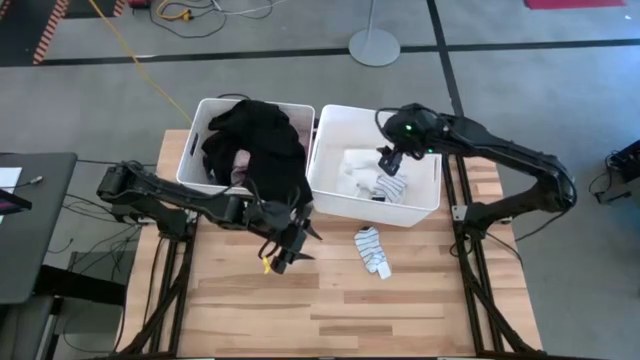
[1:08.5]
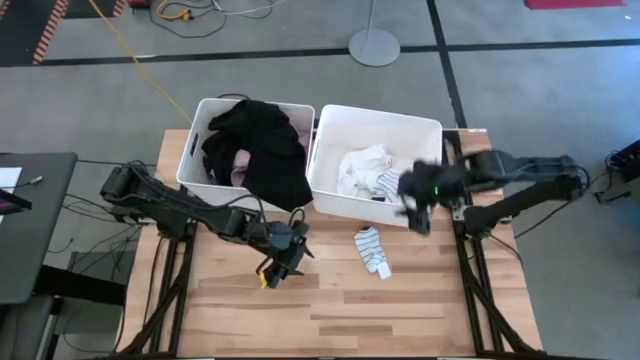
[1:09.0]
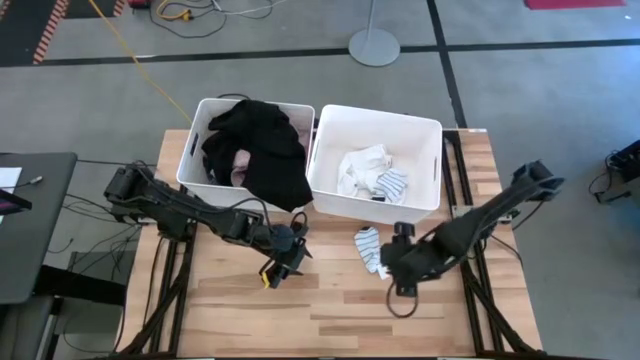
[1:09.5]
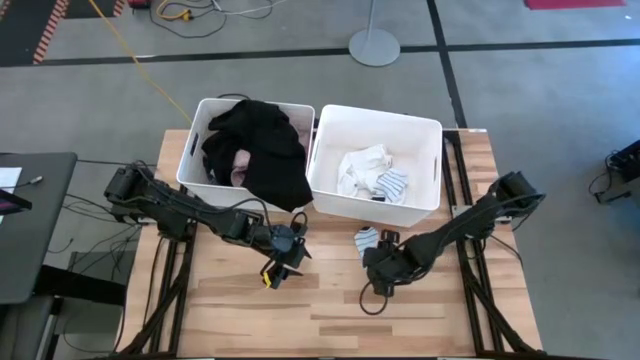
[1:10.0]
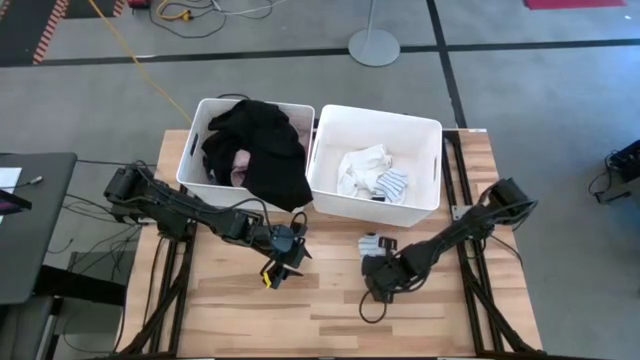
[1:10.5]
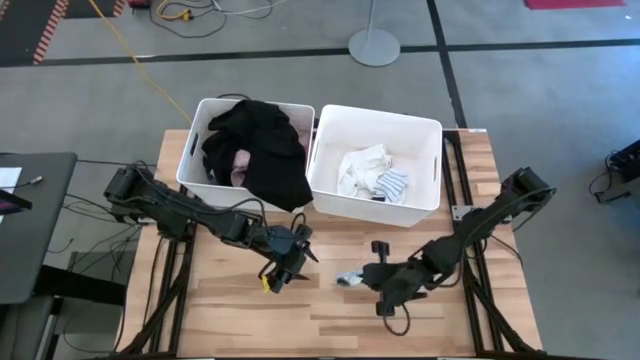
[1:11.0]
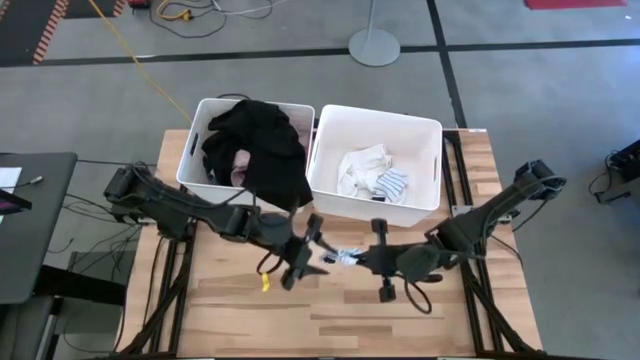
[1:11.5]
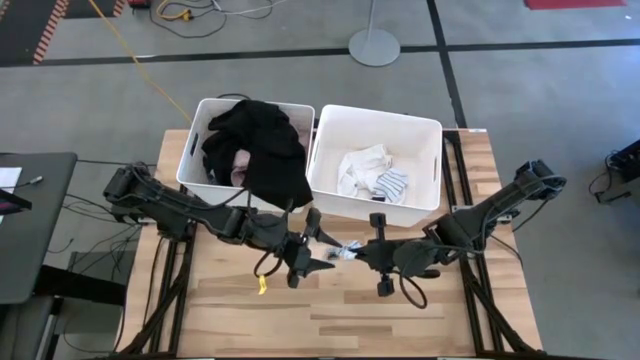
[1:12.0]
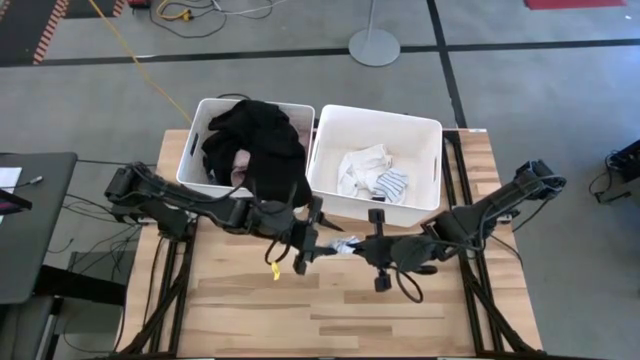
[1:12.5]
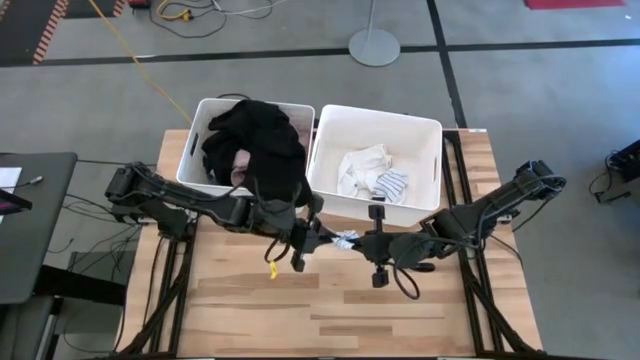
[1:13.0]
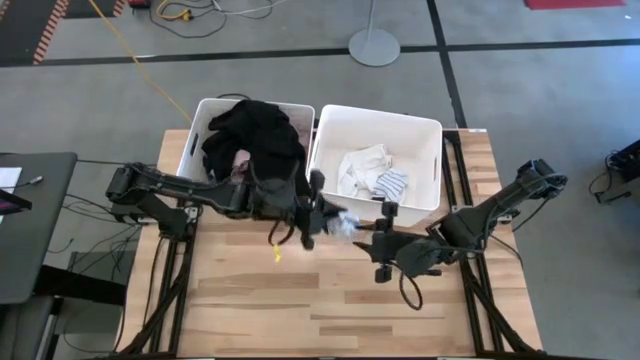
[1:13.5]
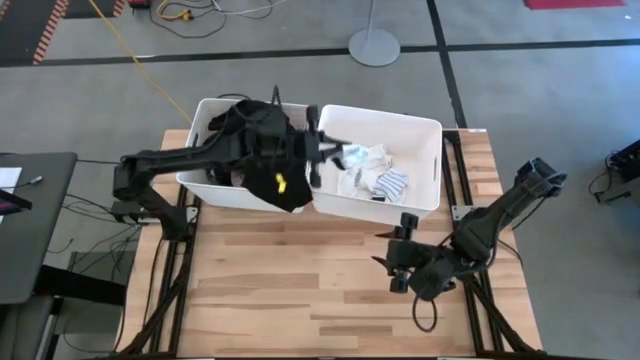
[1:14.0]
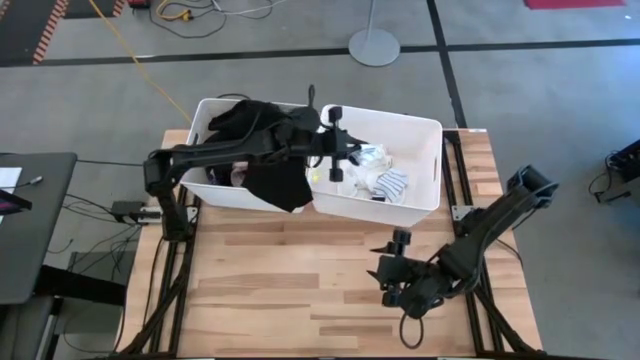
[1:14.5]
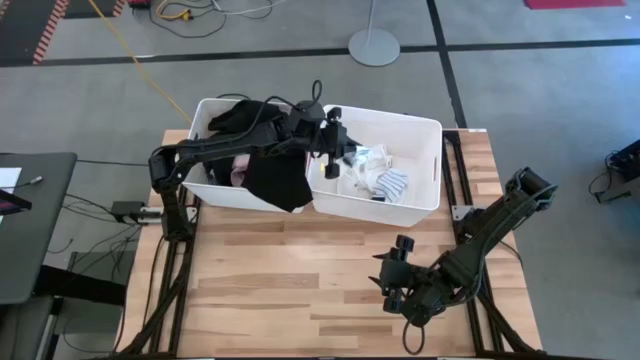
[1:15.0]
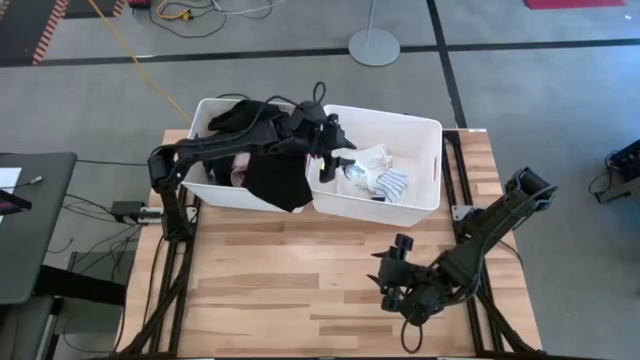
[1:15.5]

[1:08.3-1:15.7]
Task: Sort clothes
Put the white patterned sock into the right white laundry bin

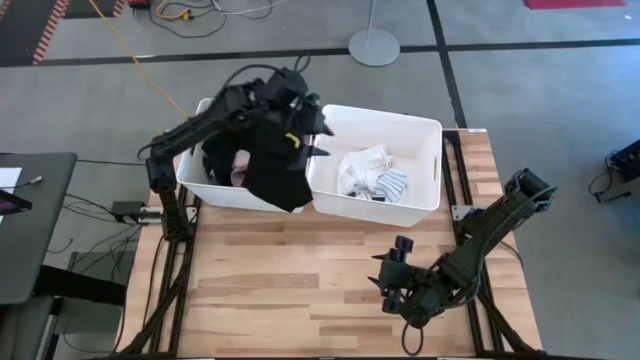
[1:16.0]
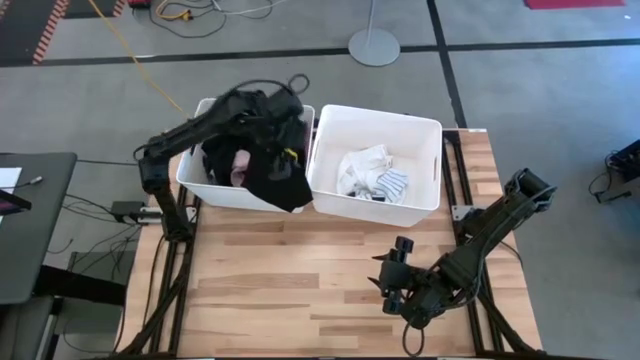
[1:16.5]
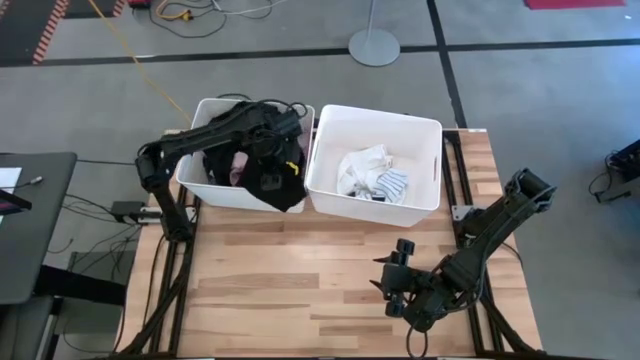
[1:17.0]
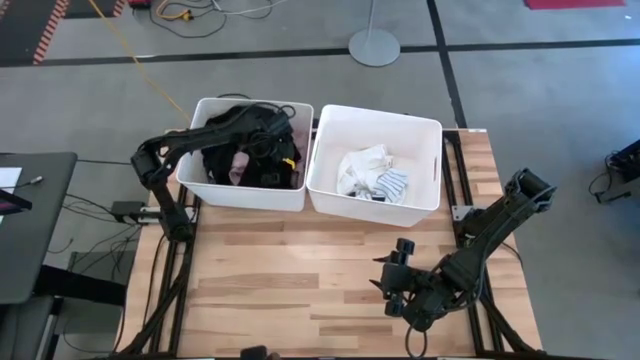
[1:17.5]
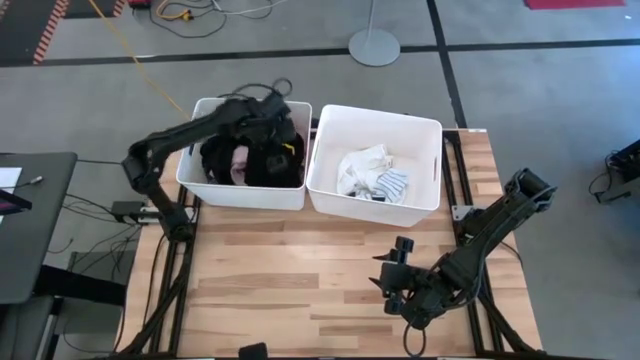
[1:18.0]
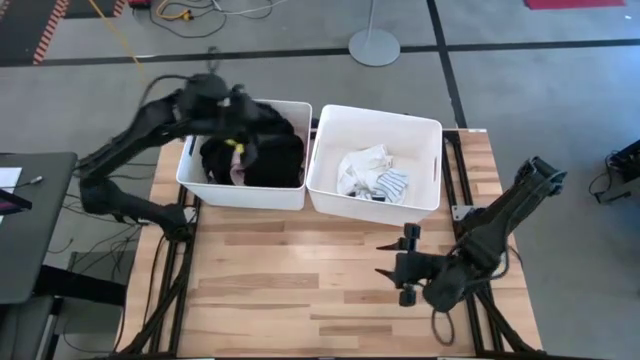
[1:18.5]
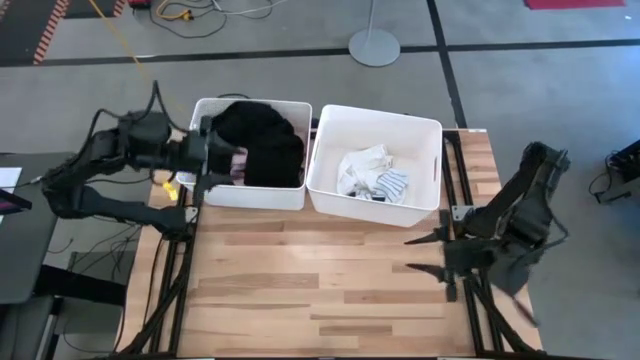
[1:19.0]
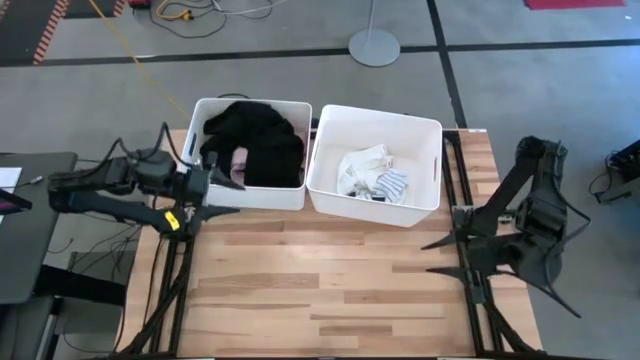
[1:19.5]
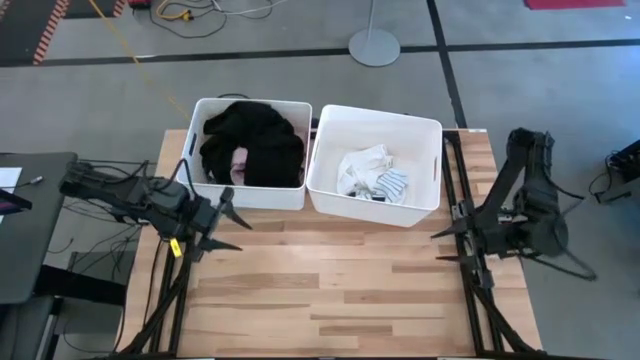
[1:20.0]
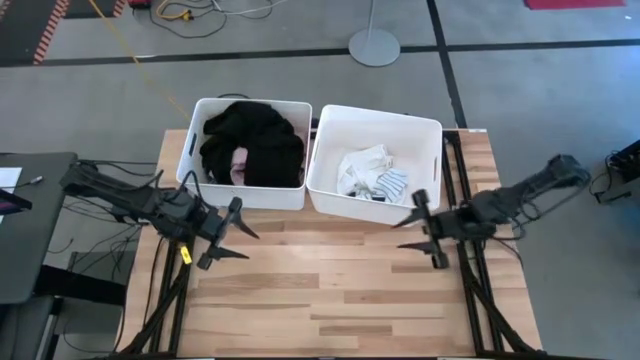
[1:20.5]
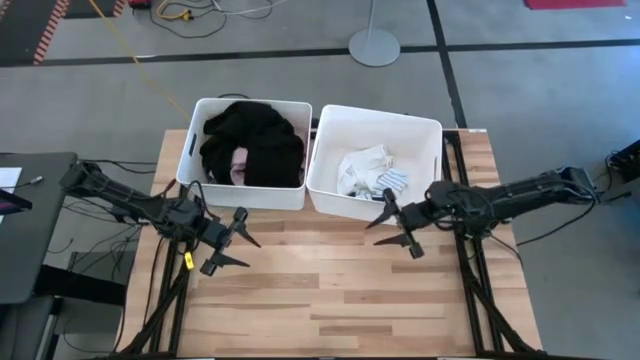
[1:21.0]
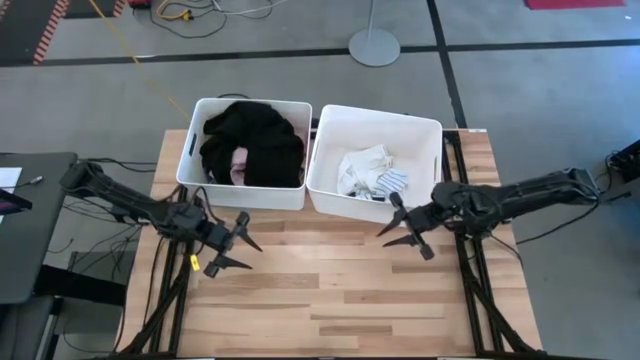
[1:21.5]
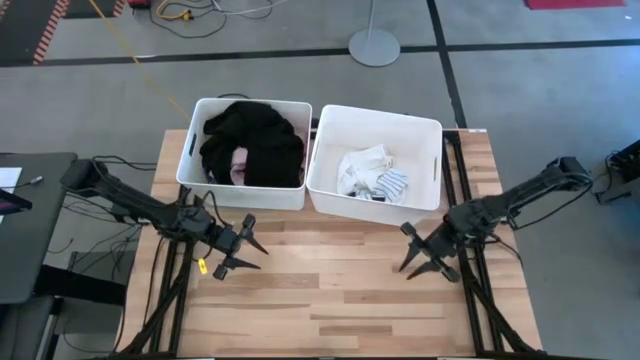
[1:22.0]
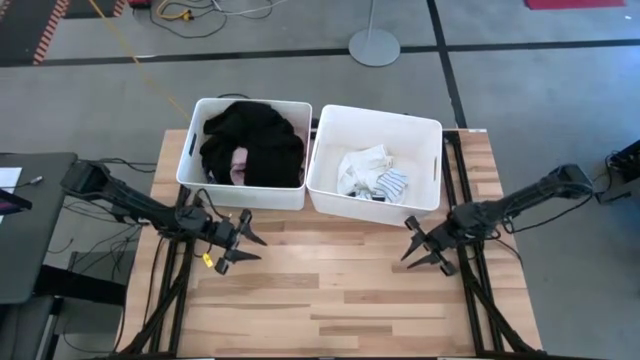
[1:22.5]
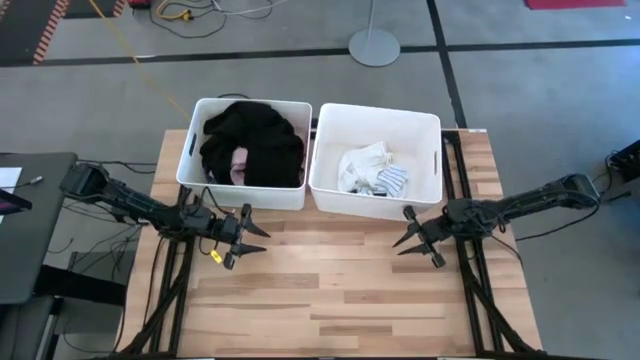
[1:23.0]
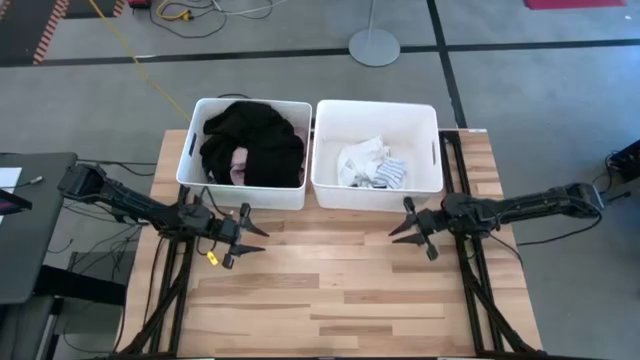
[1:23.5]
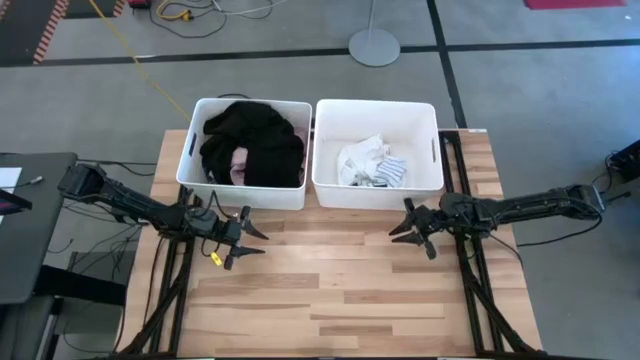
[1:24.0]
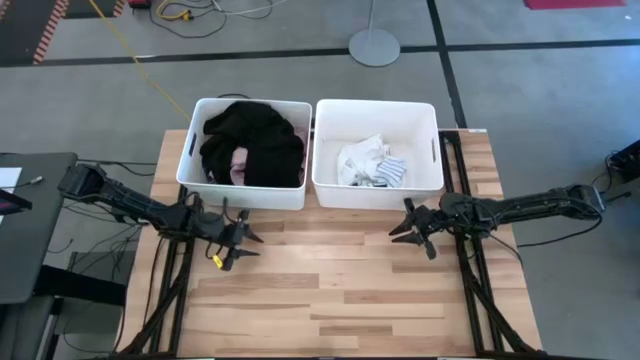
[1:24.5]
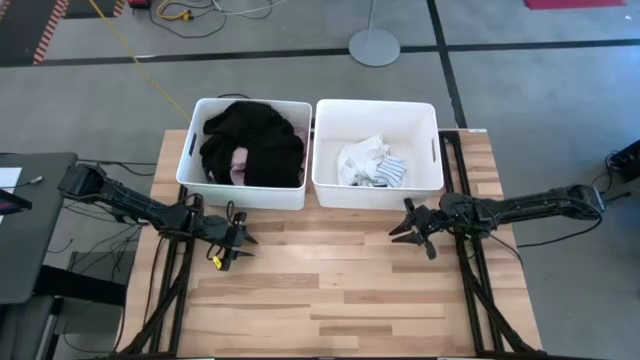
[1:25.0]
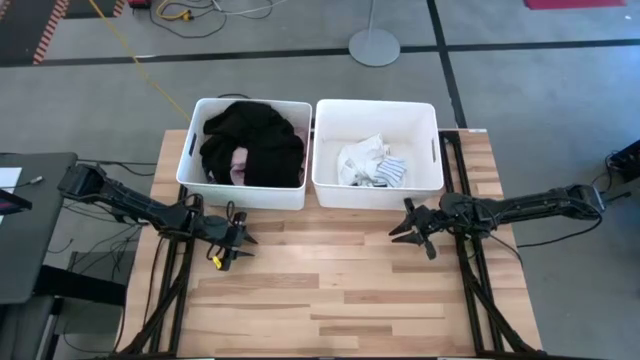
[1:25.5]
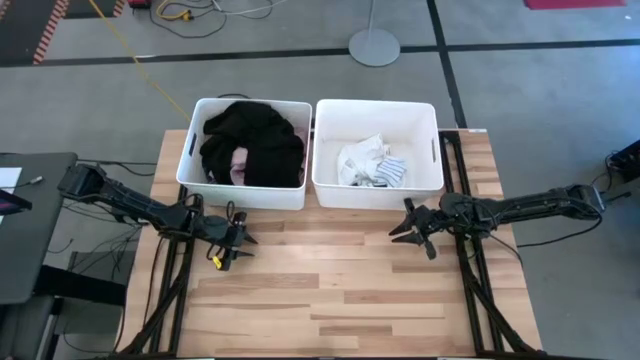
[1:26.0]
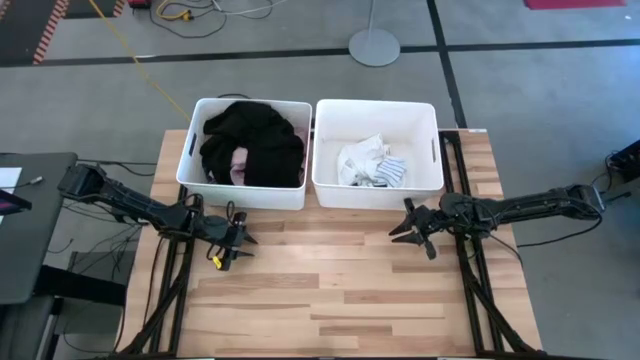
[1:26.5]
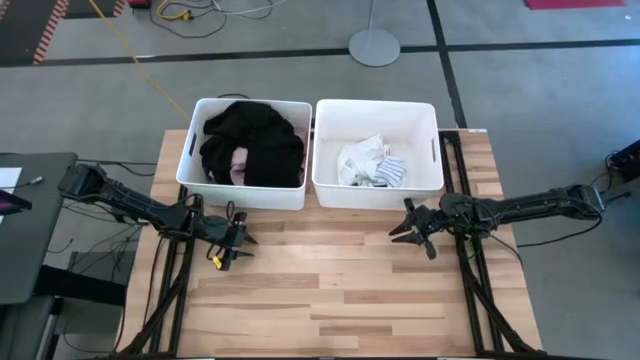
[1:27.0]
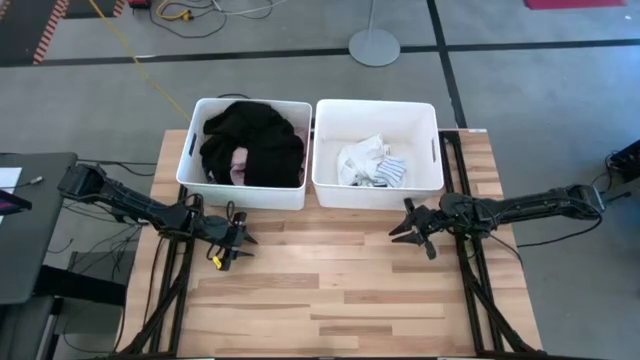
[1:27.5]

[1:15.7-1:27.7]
Return to Home Position

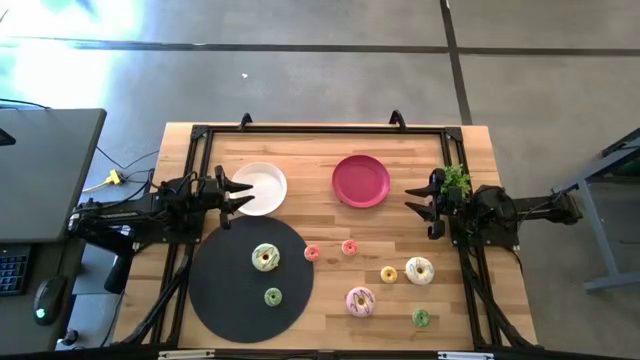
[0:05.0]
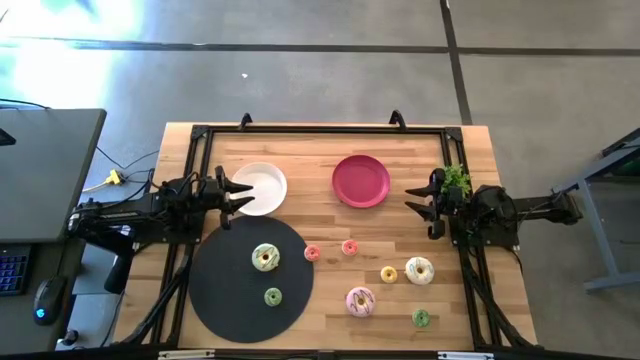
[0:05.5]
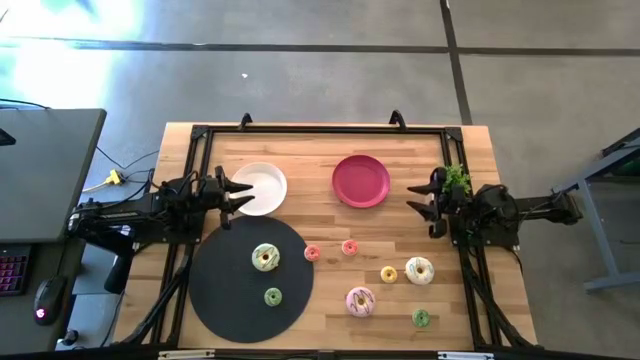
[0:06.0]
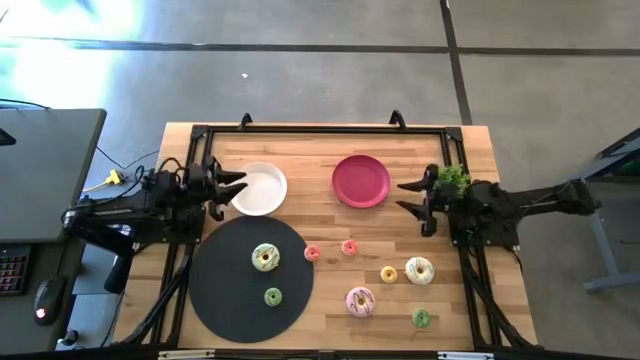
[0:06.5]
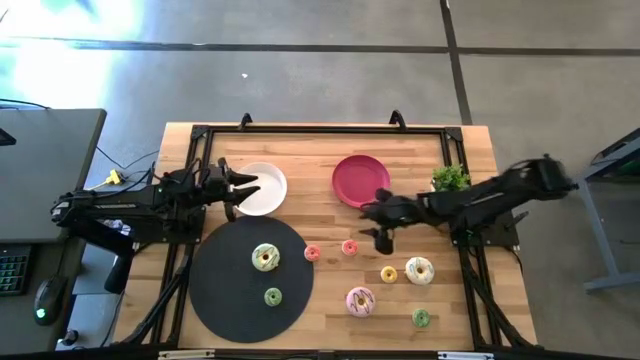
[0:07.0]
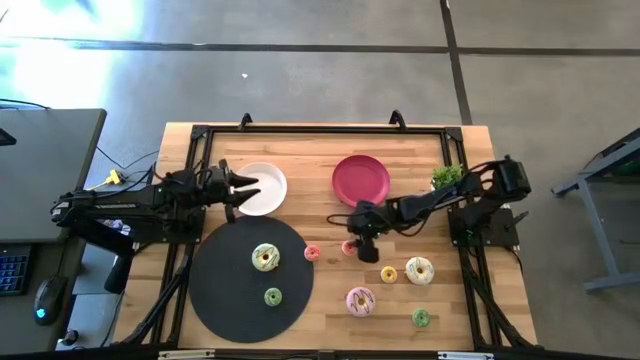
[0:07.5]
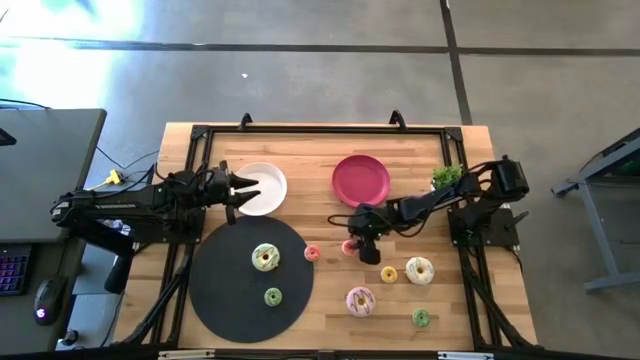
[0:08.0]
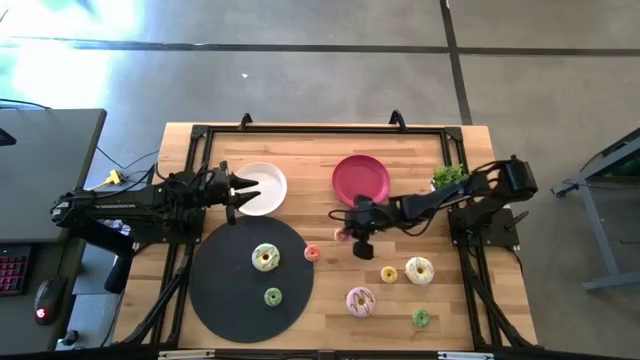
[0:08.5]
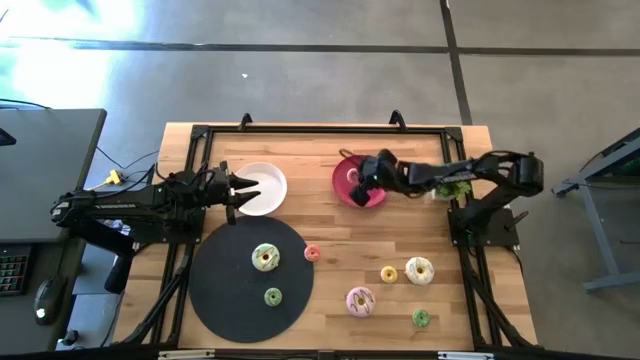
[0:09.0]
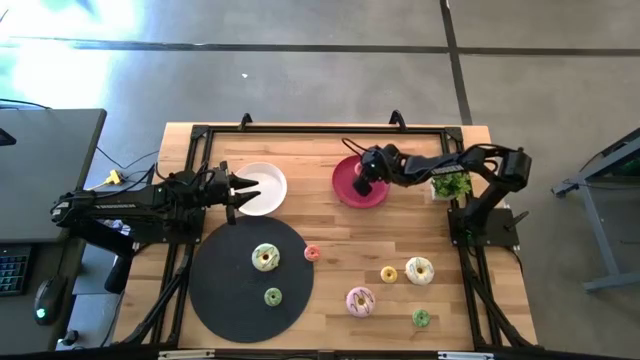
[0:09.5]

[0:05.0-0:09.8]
Task: Pick & Place donuts
Put the right small pink donut on the pink plate
